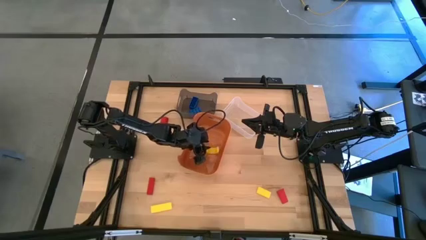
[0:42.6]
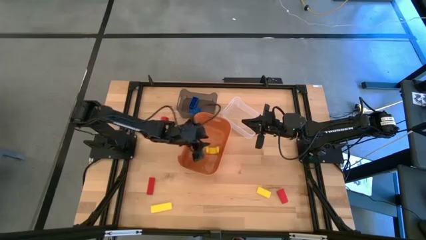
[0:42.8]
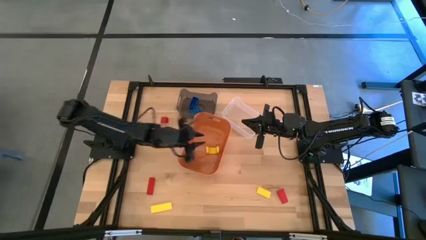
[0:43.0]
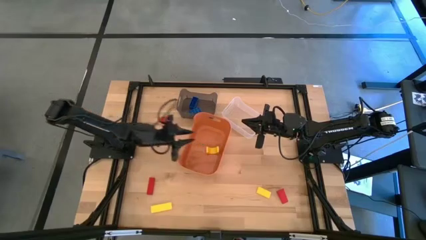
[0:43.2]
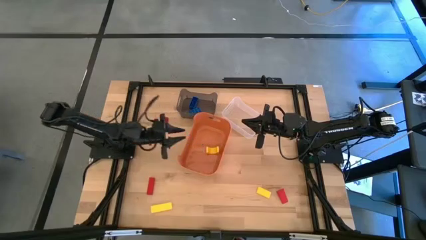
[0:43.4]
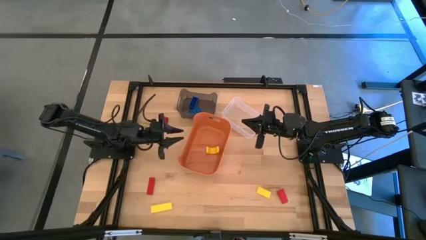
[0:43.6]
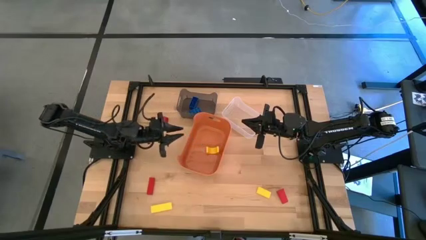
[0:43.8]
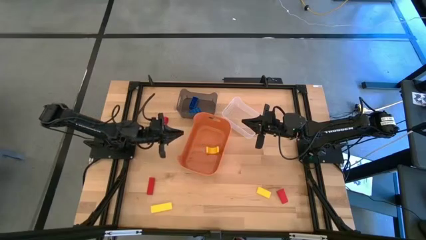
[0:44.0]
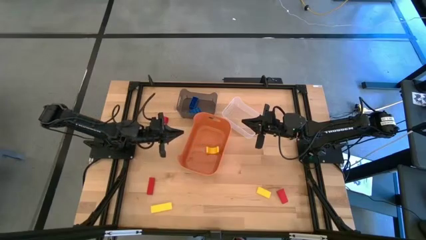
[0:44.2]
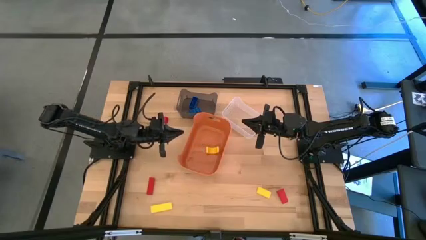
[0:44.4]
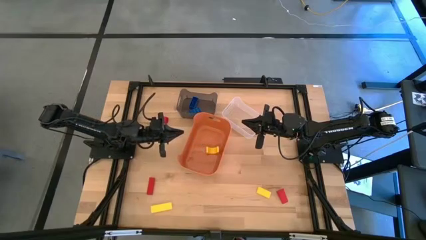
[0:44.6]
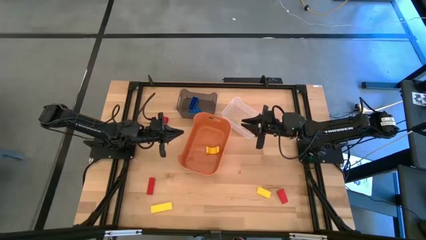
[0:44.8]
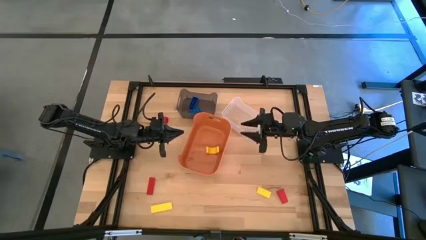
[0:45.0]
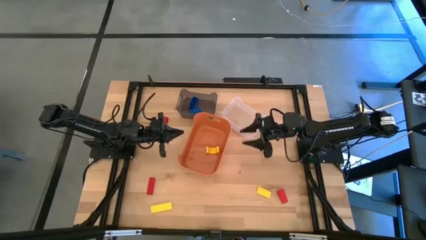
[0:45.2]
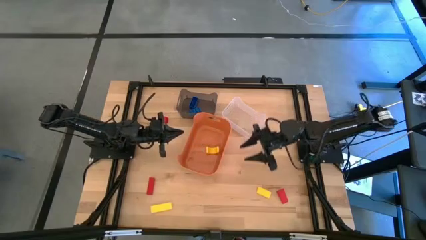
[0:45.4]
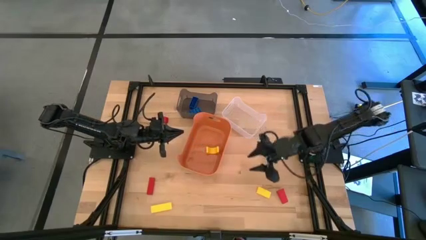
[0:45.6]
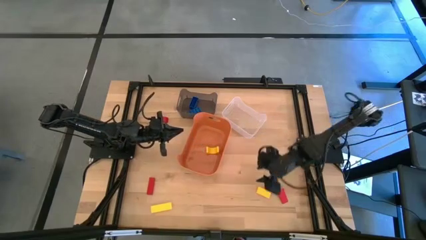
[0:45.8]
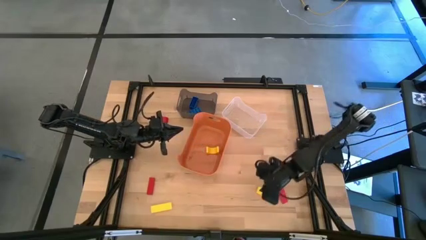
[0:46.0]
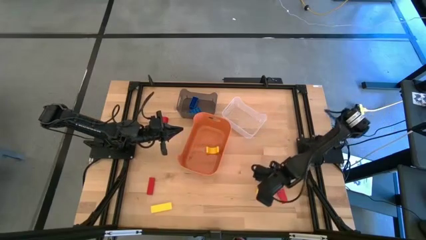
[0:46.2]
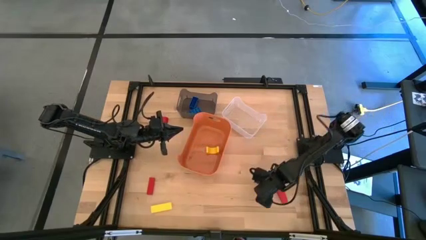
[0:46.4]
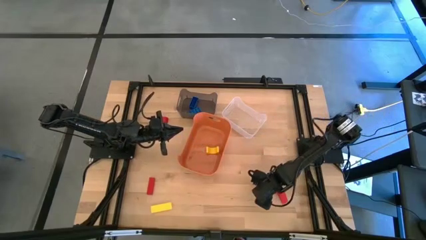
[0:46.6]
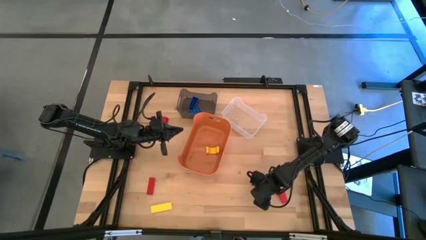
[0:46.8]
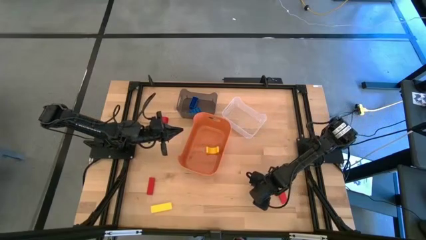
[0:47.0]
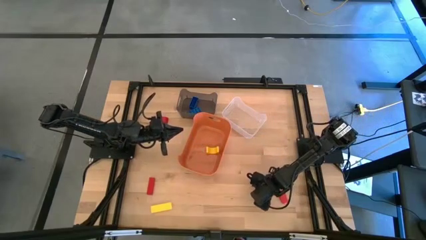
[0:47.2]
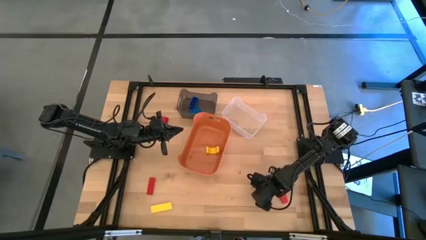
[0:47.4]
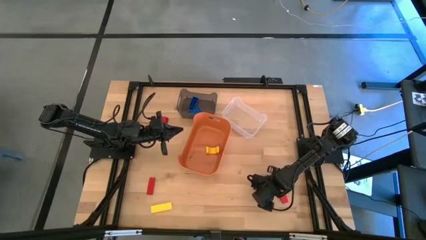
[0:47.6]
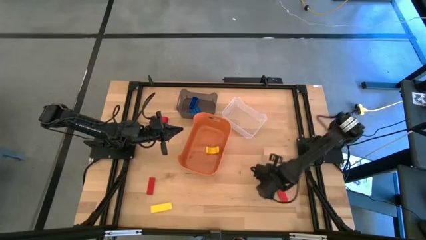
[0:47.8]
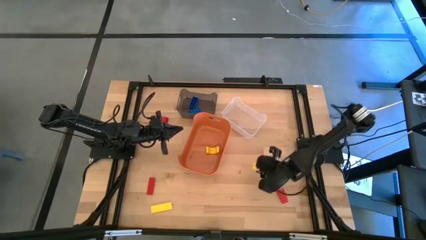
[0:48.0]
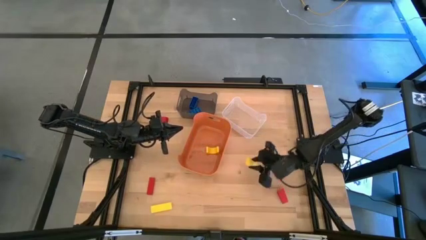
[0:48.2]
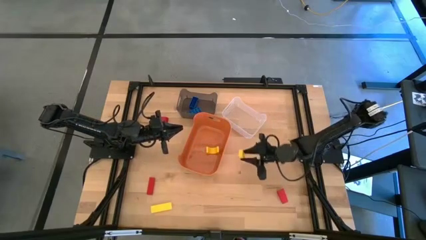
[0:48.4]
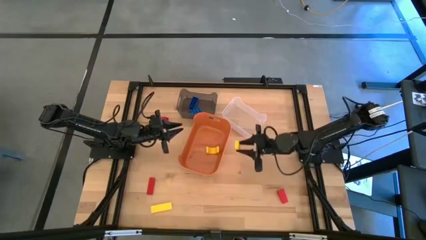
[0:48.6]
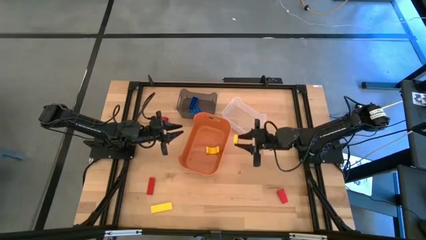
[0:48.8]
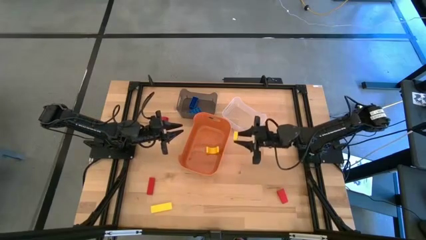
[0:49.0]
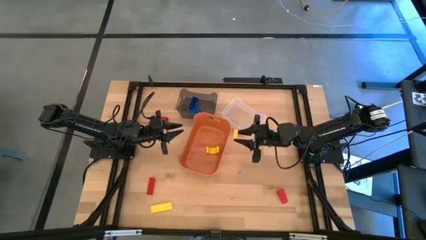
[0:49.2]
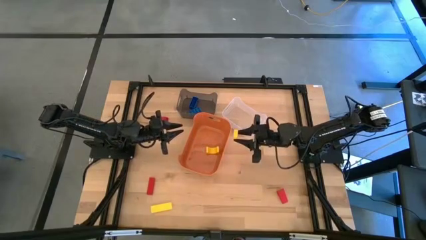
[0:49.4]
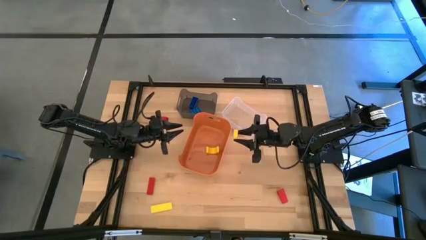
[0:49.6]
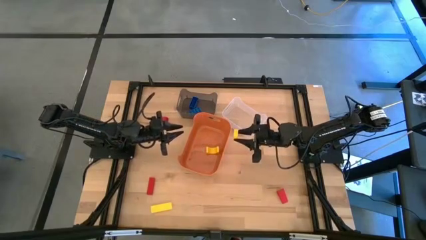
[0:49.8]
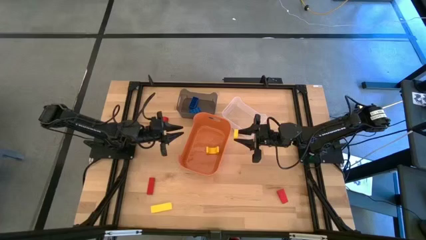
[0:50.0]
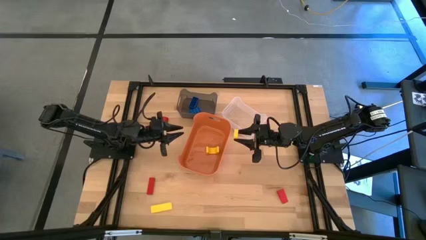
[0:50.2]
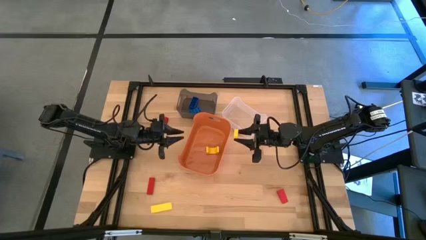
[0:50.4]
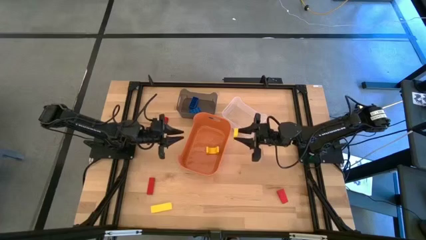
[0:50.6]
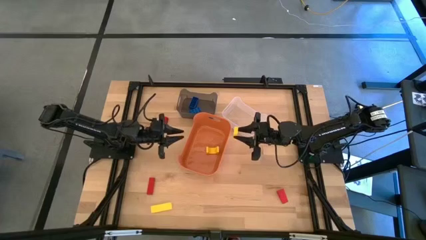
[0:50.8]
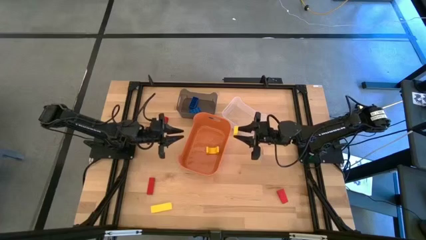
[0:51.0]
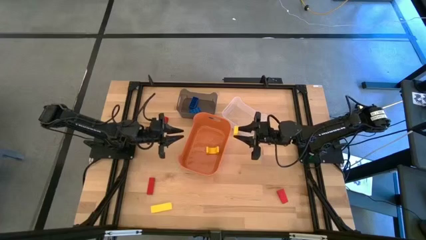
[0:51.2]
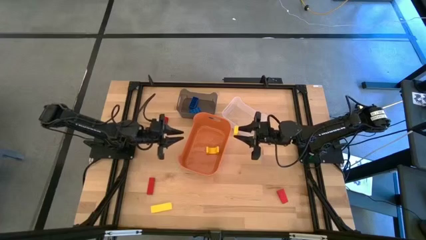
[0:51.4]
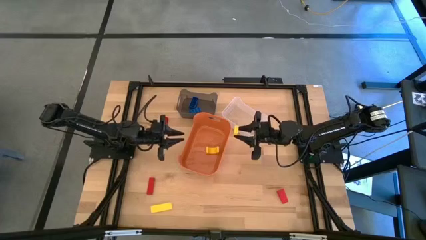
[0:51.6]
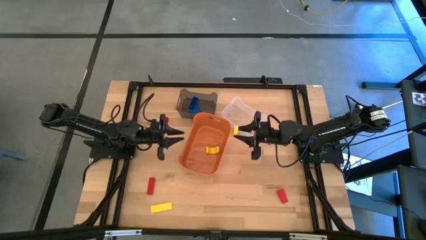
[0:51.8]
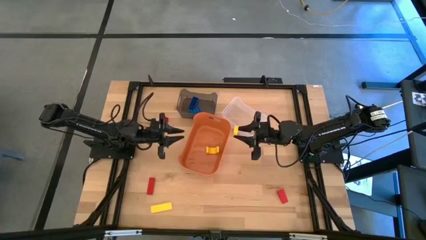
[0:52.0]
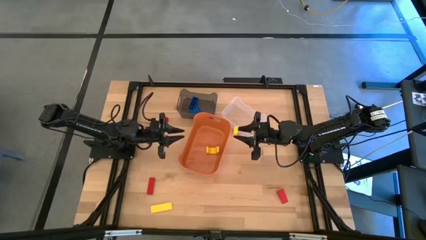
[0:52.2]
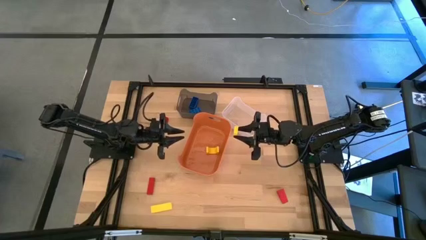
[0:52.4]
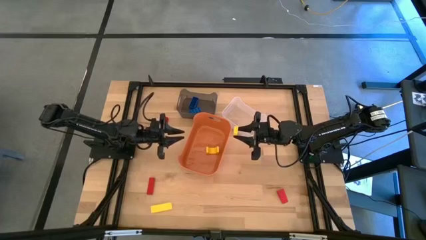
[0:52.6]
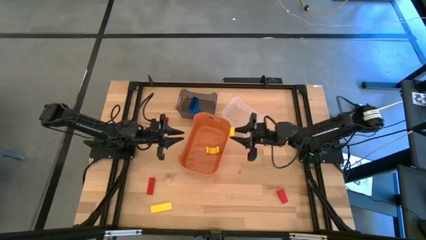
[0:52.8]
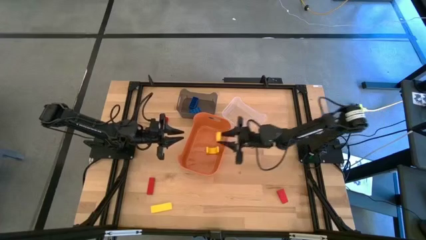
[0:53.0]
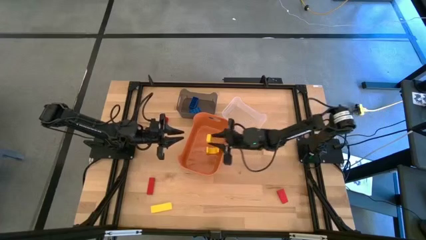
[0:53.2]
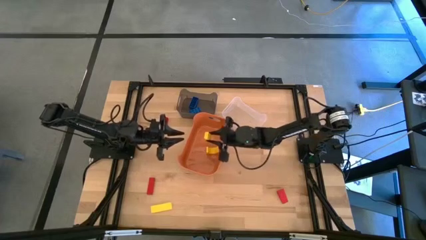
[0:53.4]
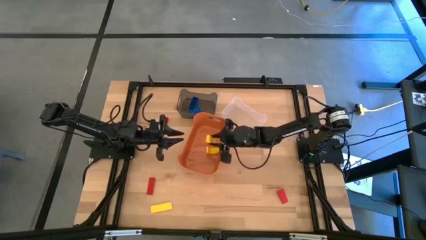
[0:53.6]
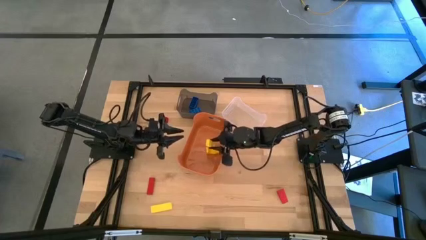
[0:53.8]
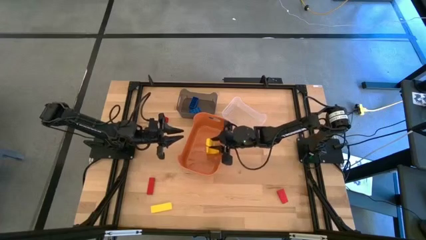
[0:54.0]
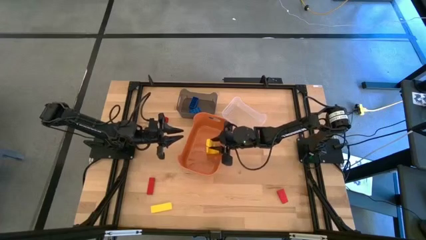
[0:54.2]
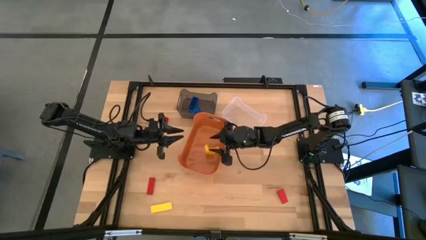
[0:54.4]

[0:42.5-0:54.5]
Task: Sort & place blocks by color
Put the right yellow block into the orange bin

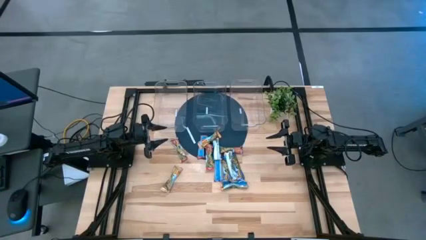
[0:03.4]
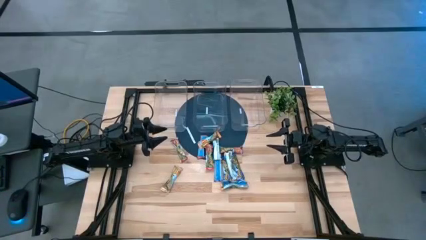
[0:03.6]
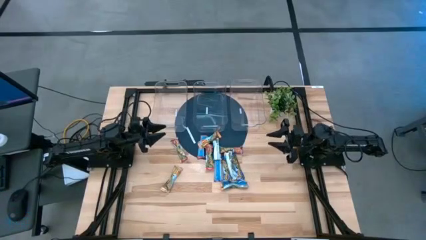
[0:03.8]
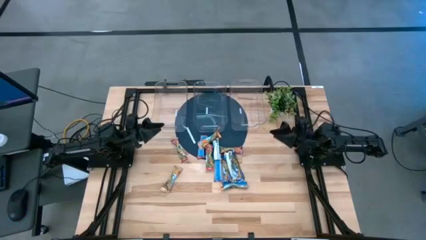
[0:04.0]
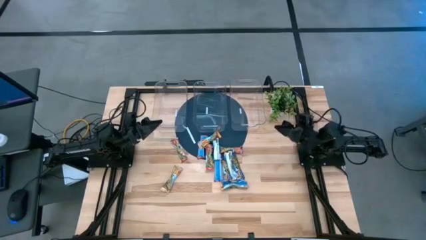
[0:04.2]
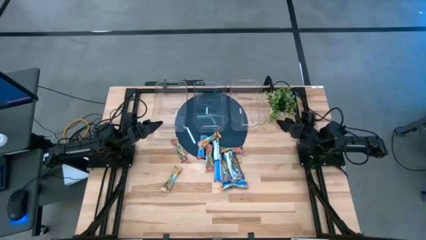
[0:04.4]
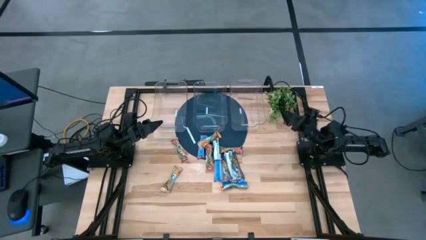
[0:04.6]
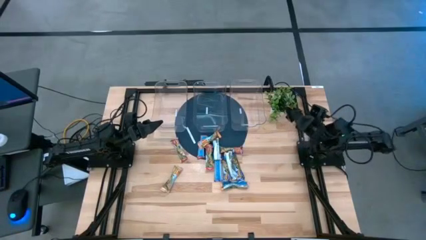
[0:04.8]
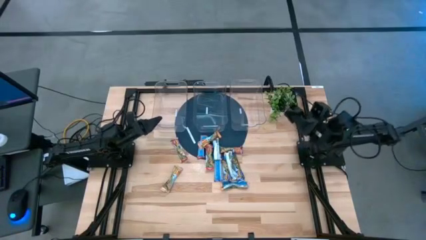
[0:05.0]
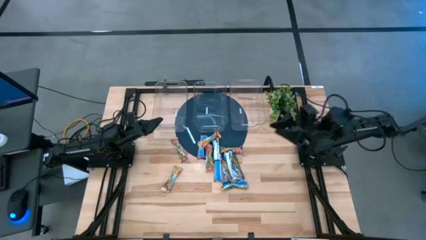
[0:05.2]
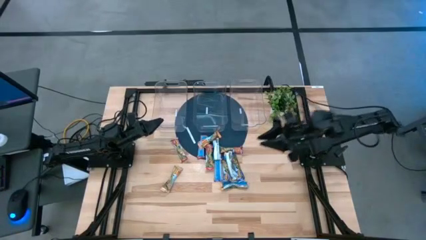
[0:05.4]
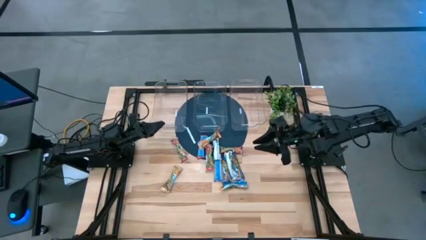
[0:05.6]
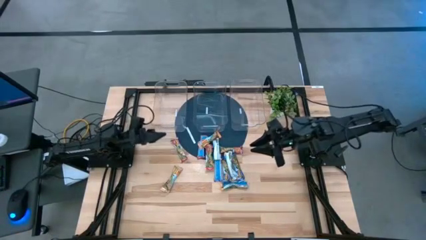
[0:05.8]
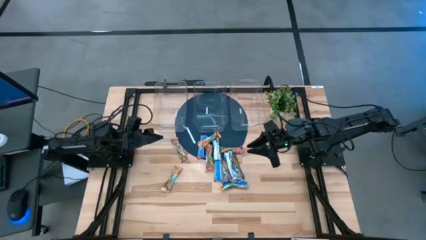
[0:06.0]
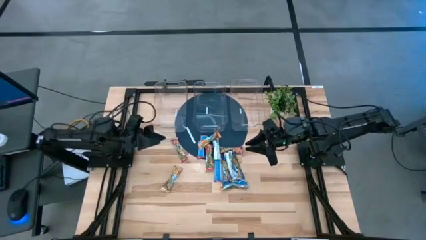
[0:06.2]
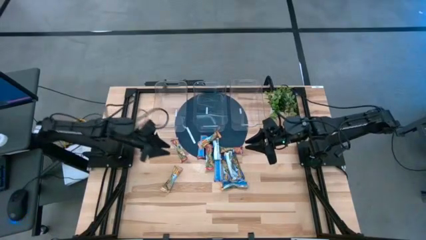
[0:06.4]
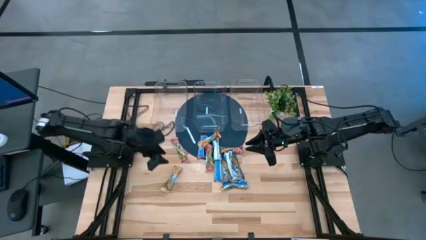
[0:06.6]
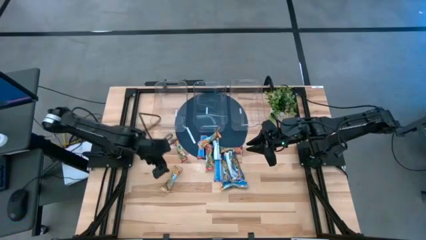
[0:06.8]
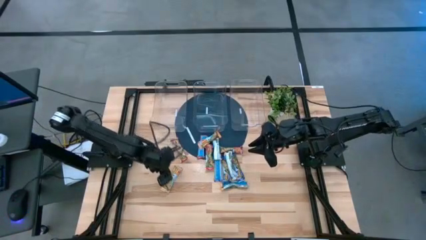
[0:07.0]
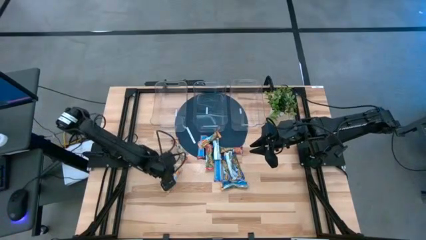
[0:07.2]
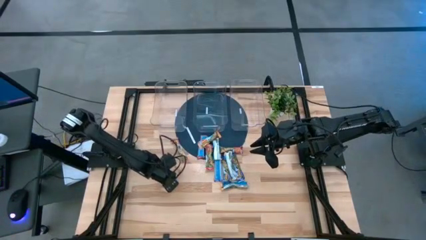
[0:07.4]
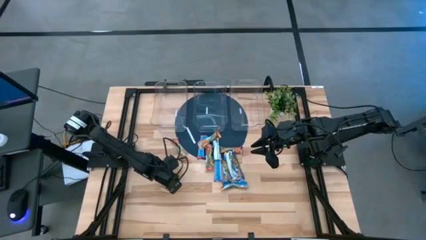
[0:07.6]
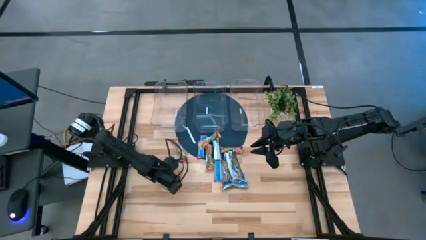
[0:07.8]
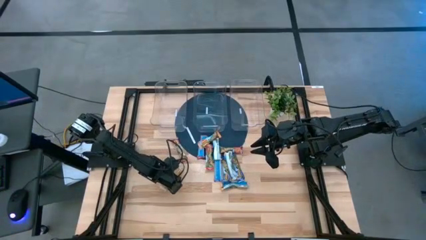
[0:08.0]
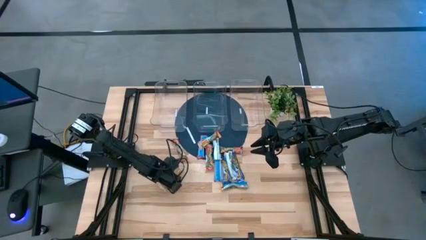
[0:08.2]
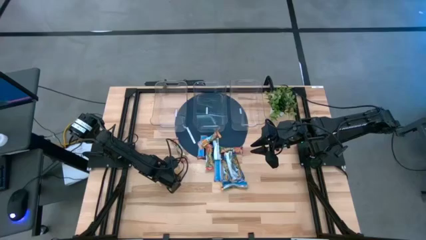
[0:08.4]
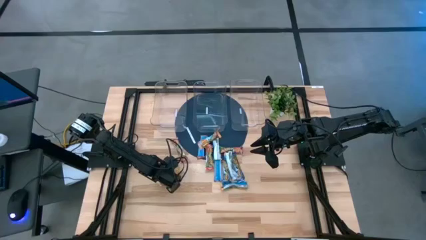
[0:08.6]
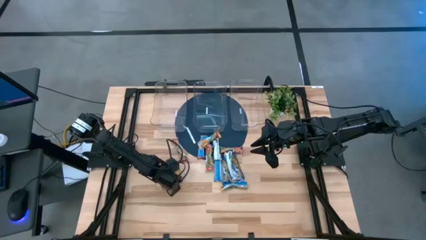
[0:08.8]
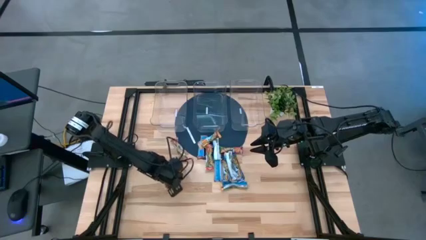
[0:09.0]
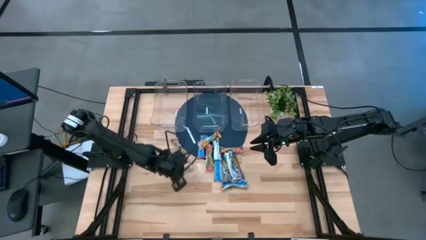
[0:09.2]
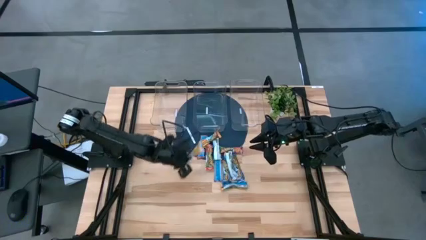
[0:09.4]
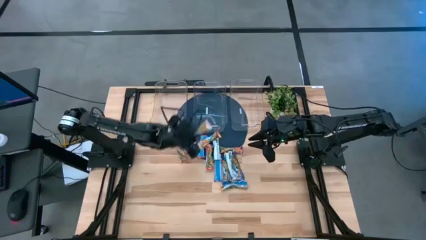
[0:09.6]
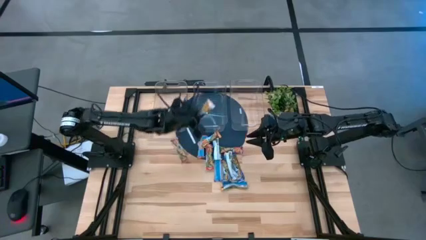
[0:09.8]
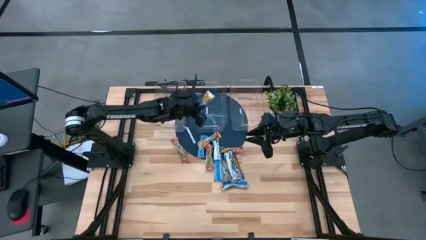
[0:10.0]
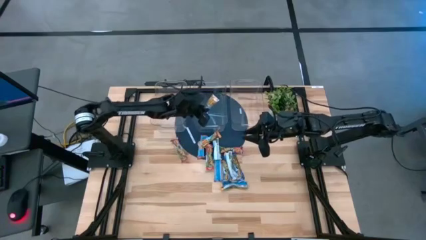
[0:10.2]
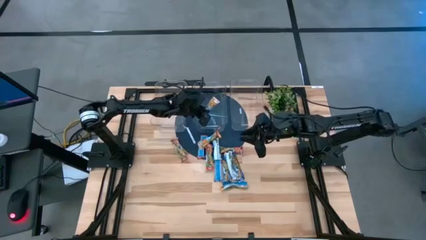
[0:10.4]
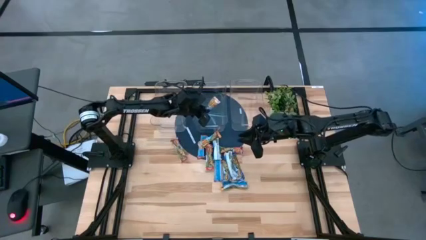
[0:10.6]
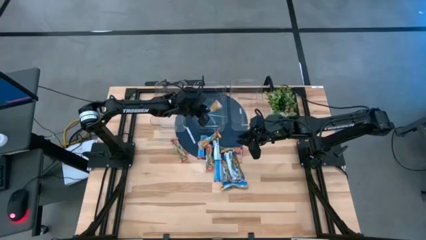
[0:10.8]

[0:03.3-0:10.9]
Task: Pick and place Granola Bars by type
Put the yellow granola bar into the middle transparent bin
